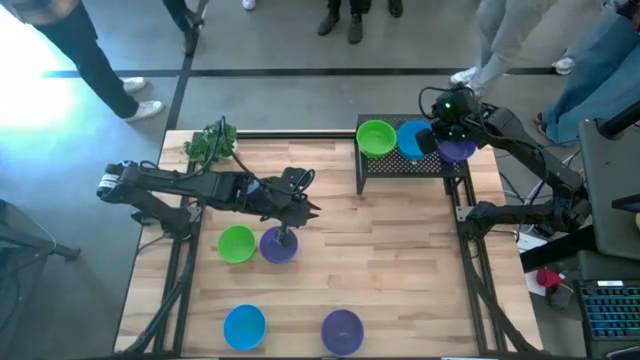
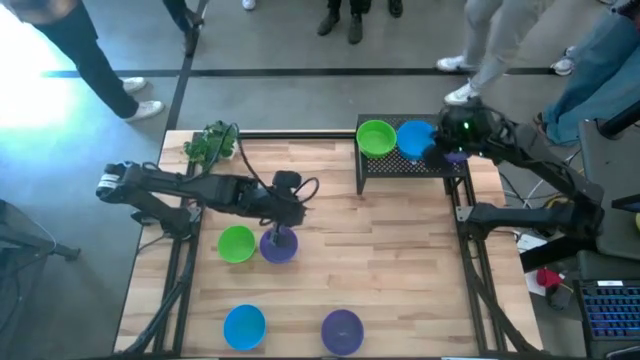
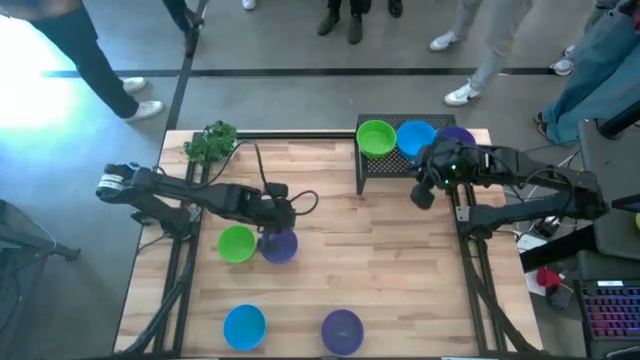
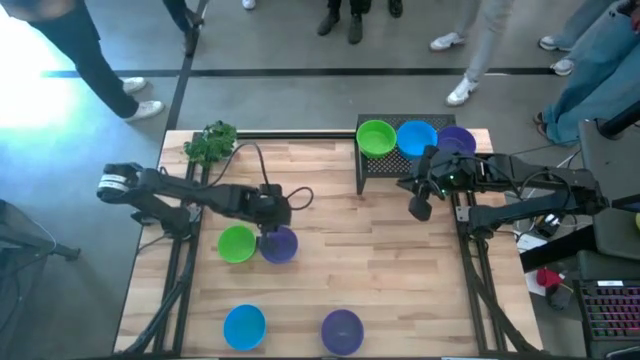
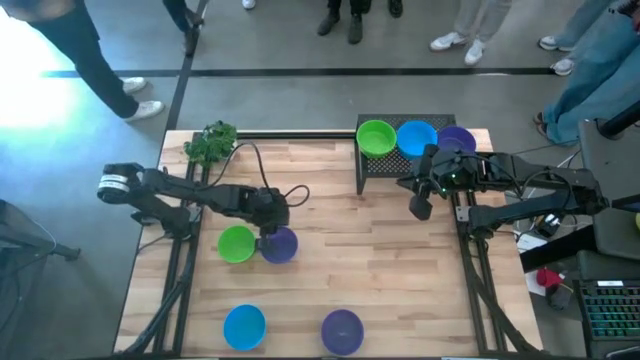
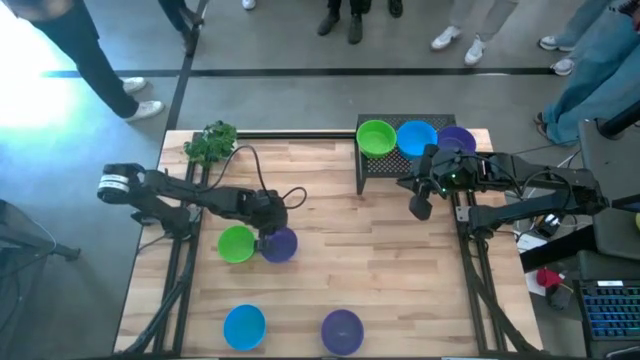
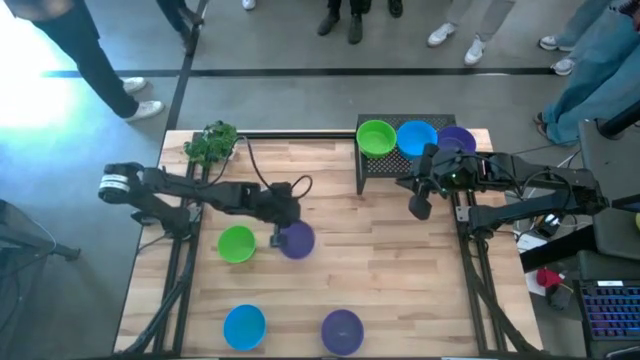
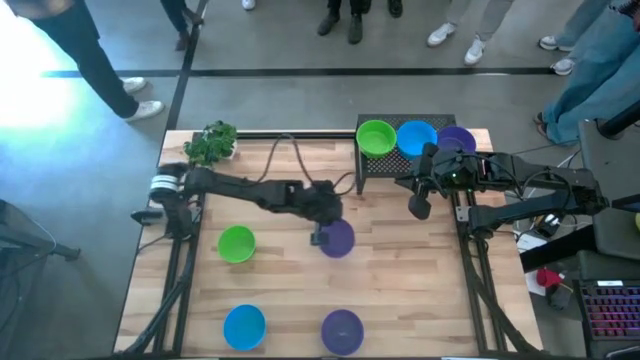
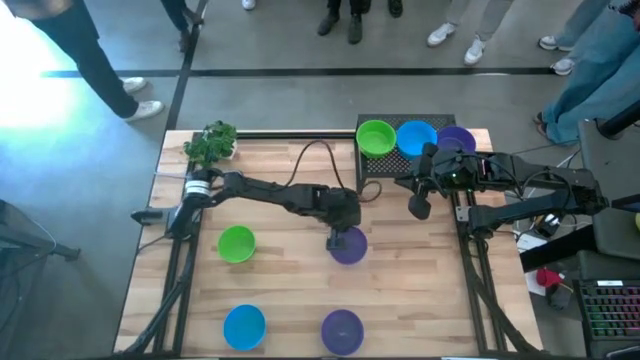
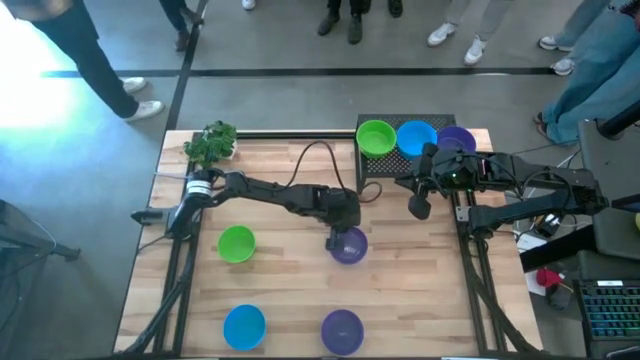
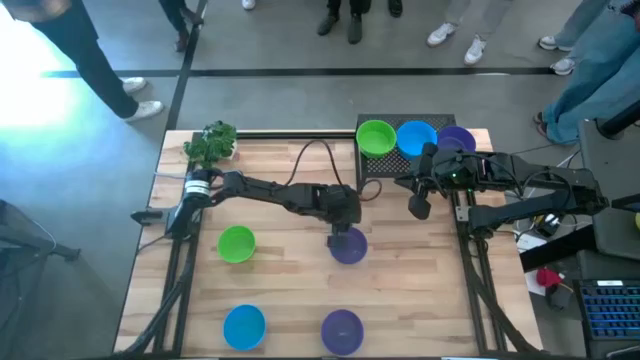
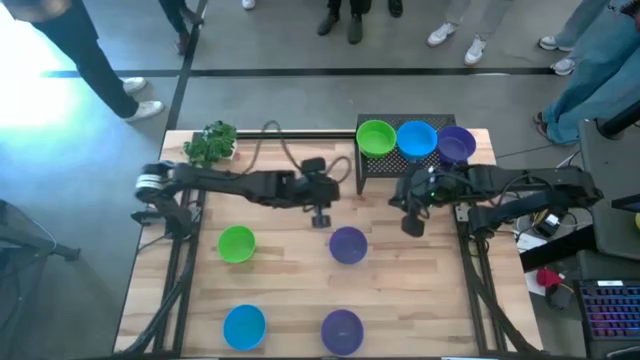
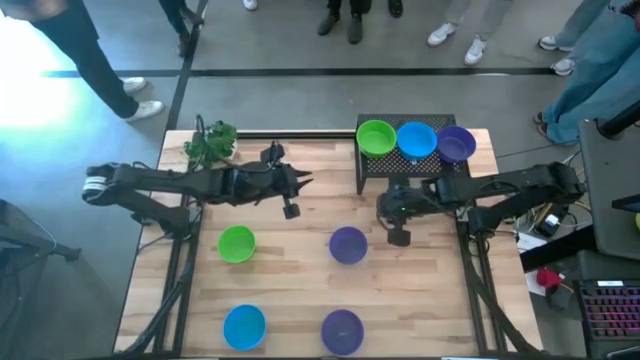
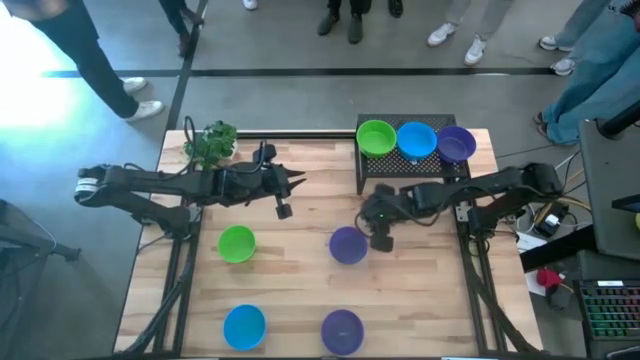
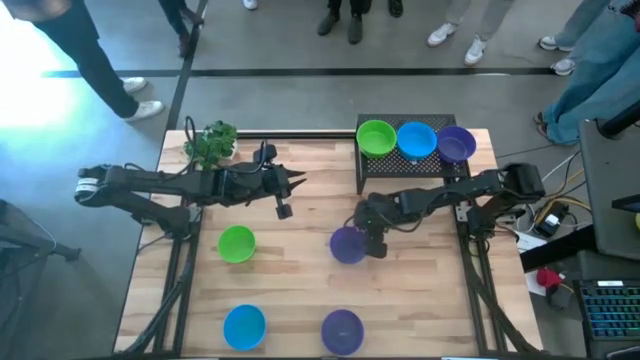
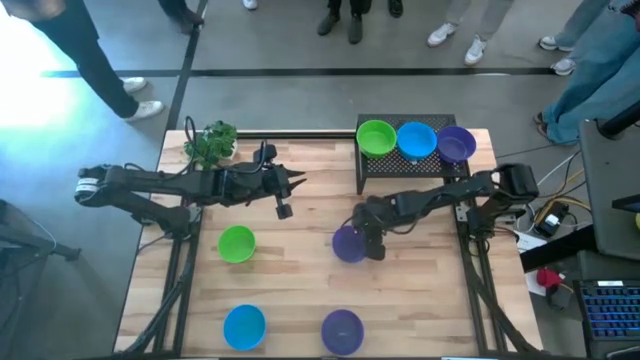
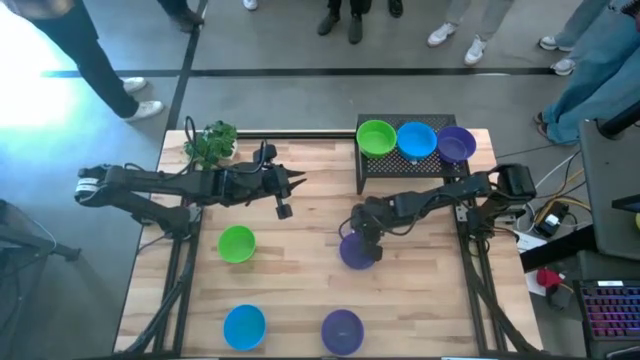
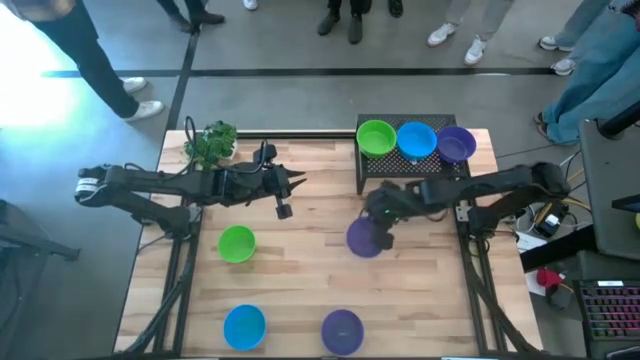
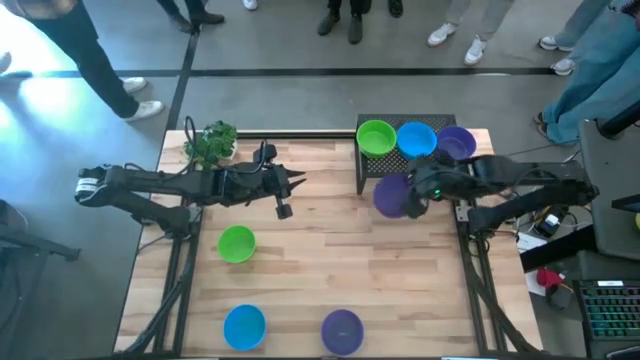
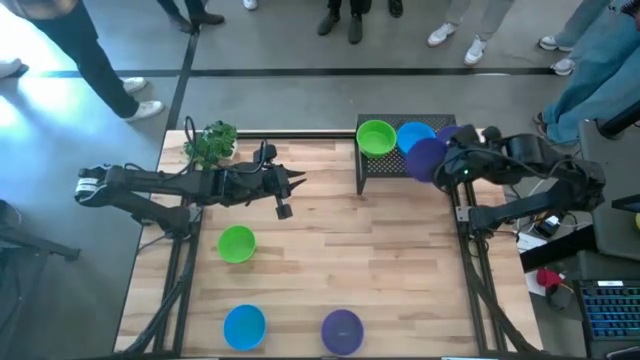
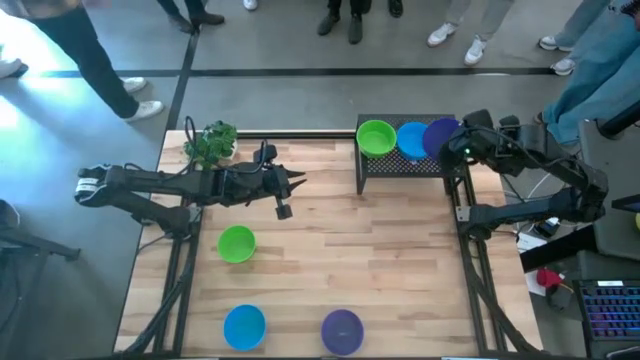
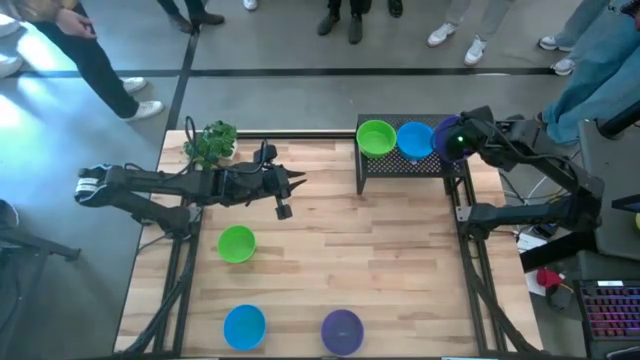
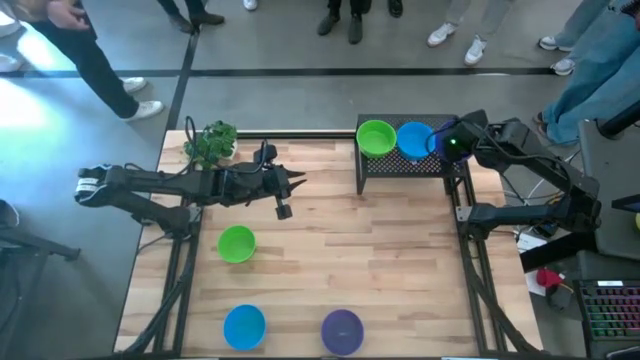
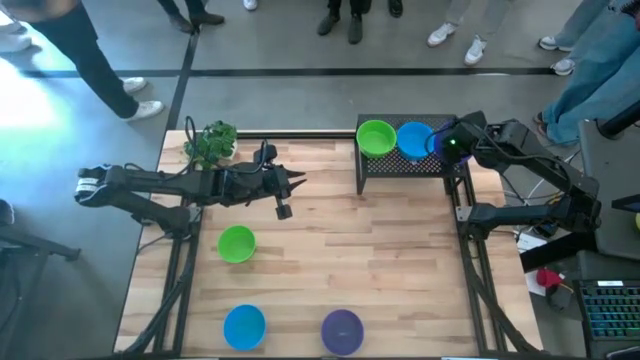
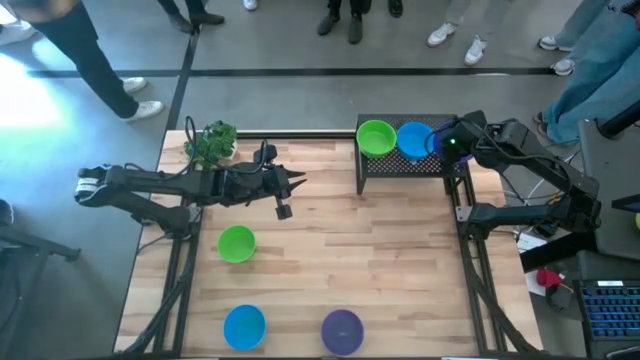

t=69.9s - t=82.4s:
Task: Pick & Place Mini bowls
Stack the top violet bowl on top of the violet bowl on the shelf

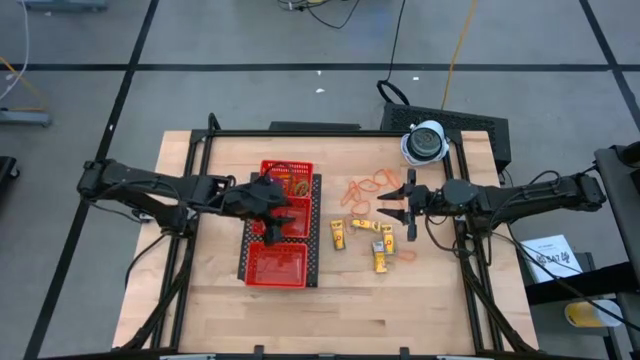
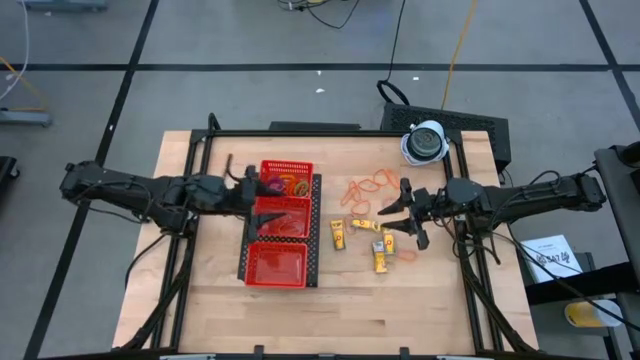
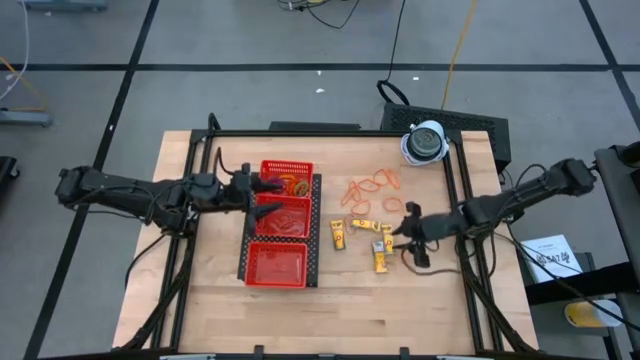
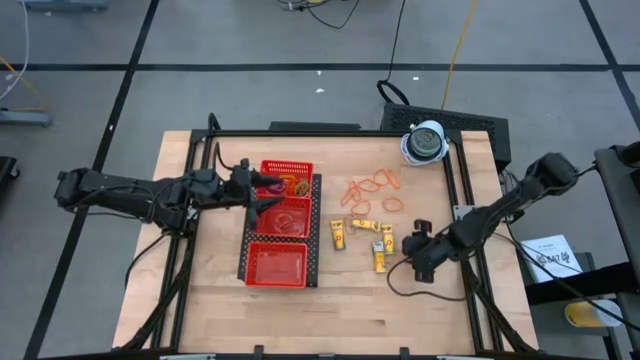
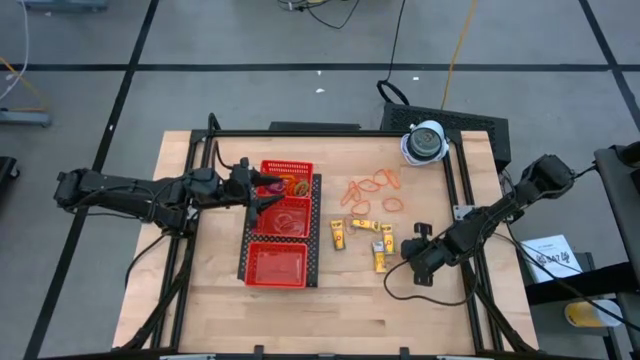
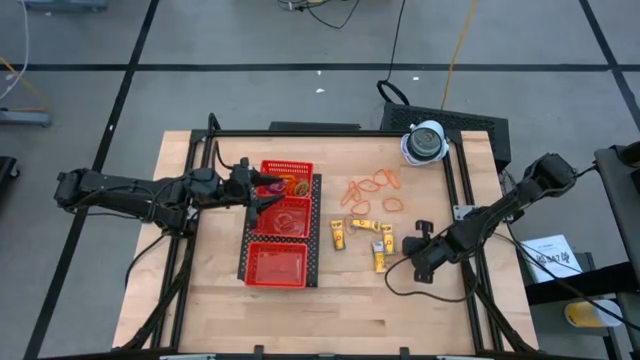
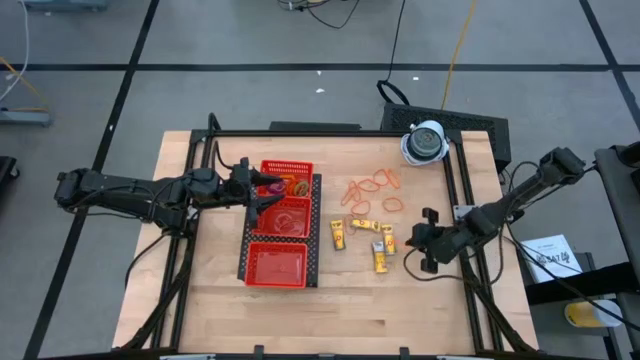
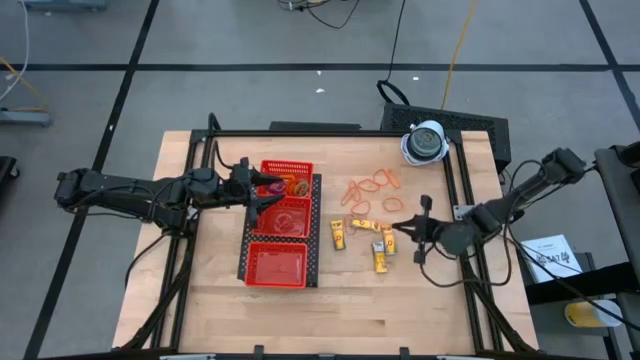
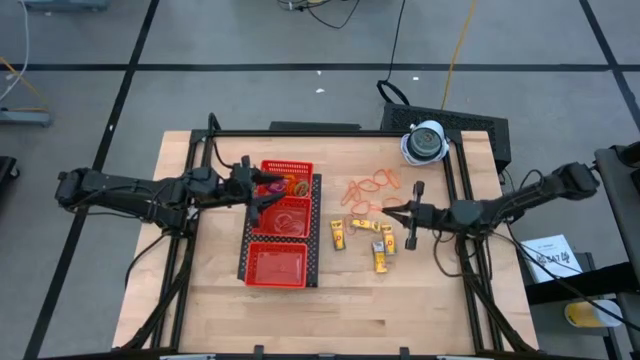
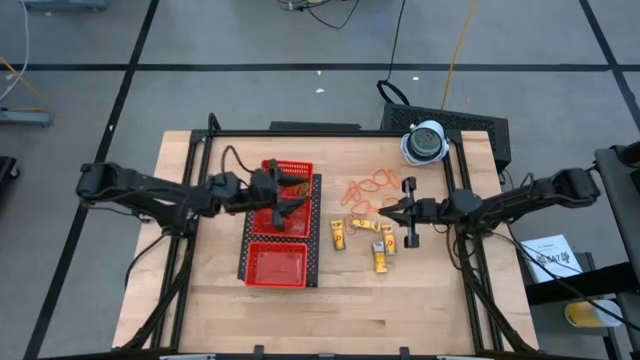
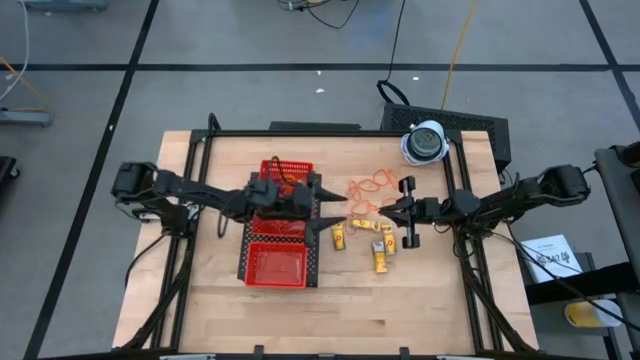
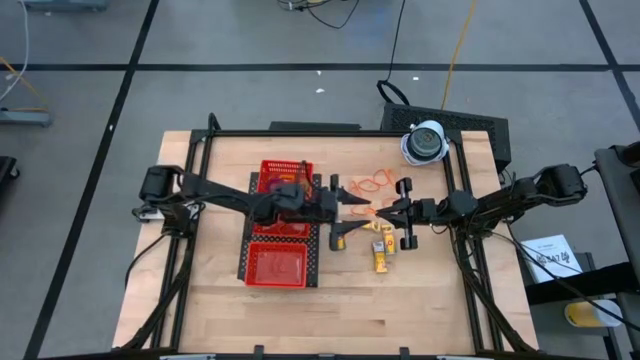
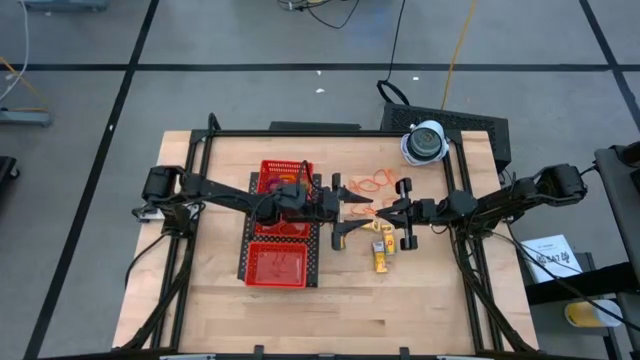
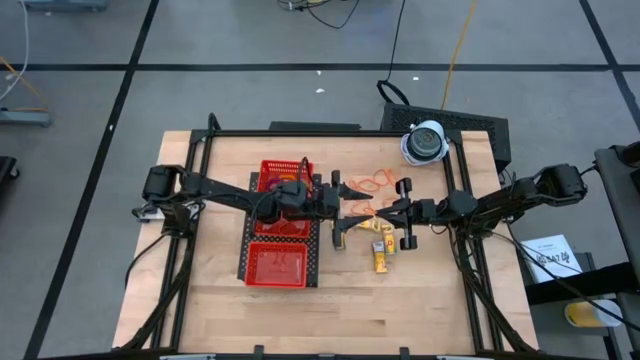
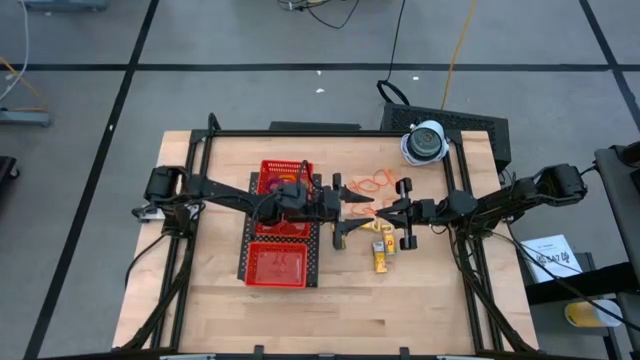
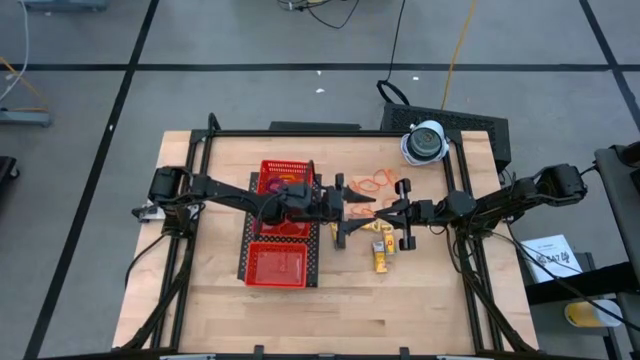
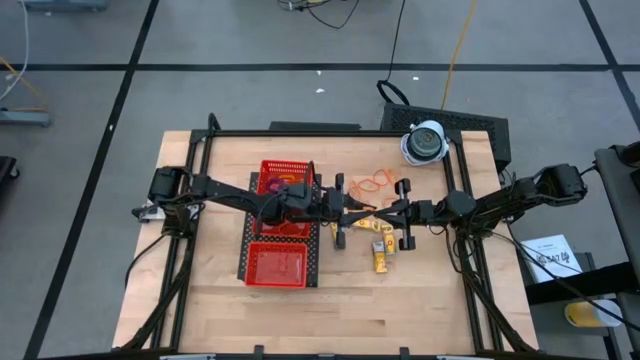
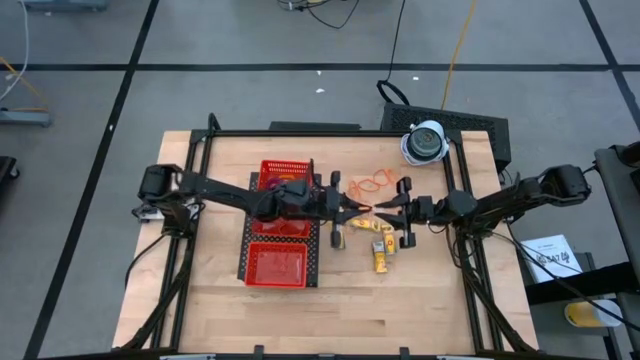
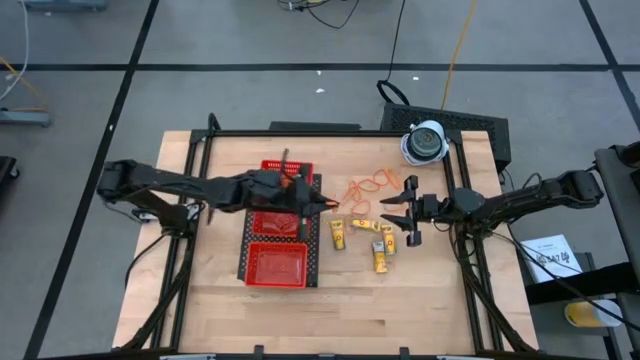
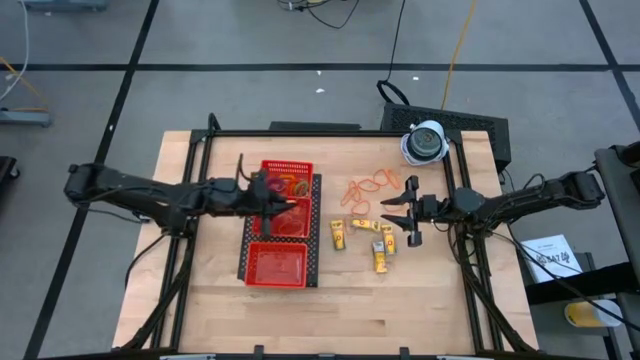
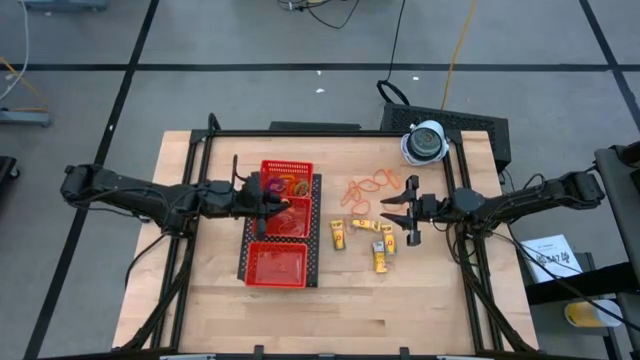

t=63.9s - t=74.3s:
Task: Pick & Place Office Desk Supplies
Put the orange rubber band into the middle red basket on the shelf
